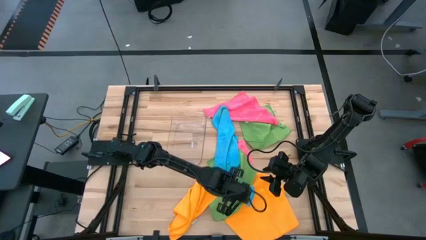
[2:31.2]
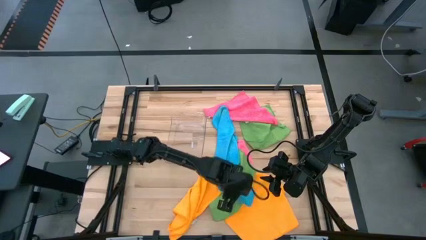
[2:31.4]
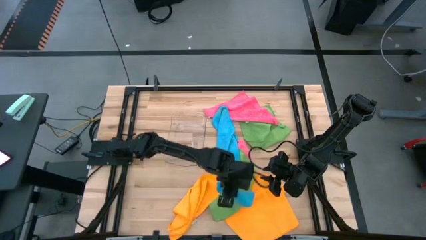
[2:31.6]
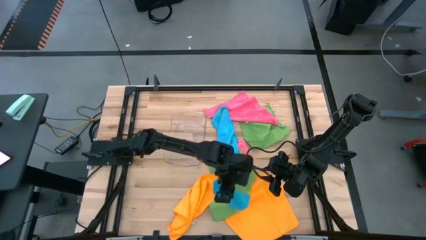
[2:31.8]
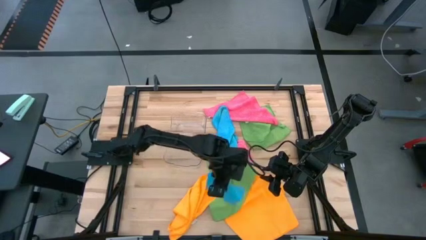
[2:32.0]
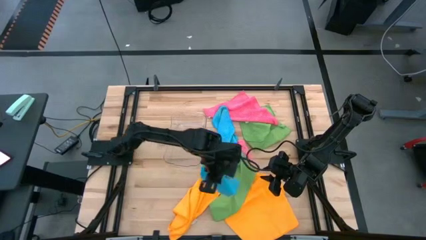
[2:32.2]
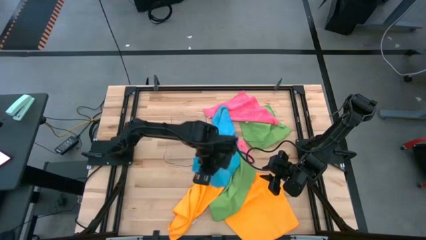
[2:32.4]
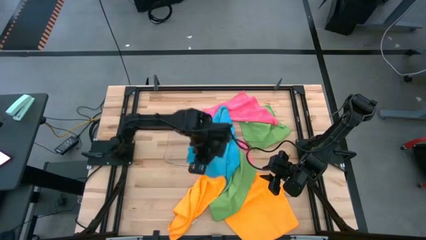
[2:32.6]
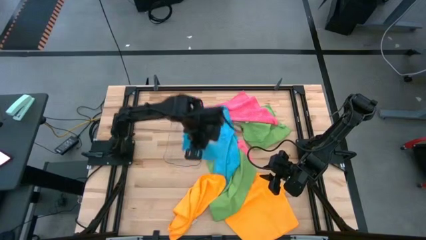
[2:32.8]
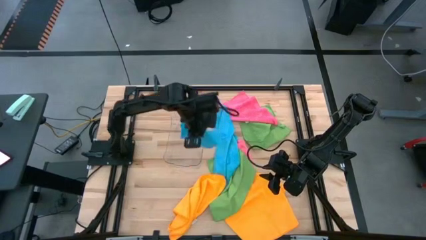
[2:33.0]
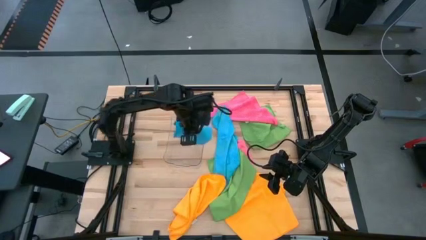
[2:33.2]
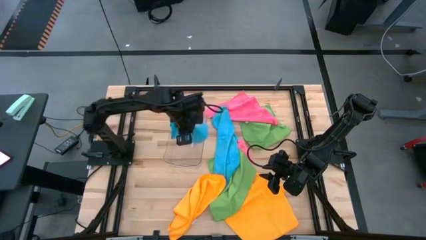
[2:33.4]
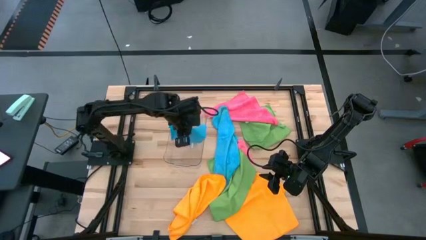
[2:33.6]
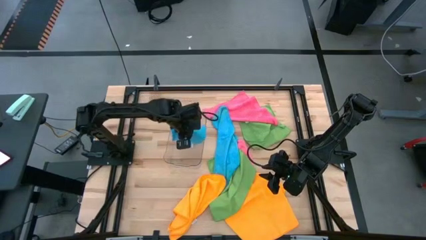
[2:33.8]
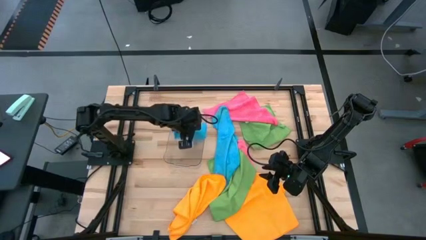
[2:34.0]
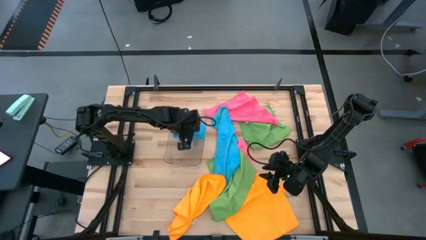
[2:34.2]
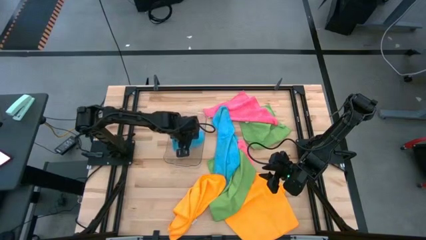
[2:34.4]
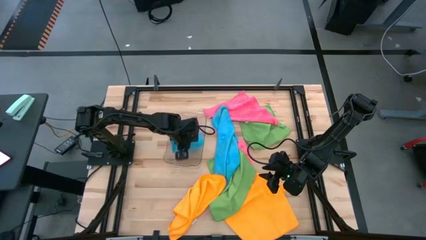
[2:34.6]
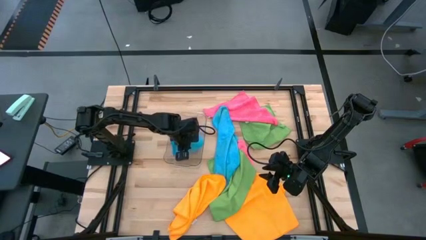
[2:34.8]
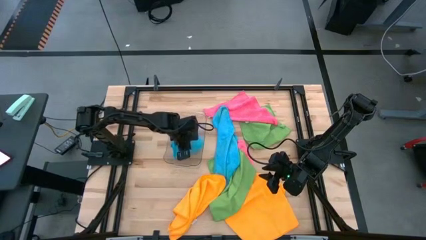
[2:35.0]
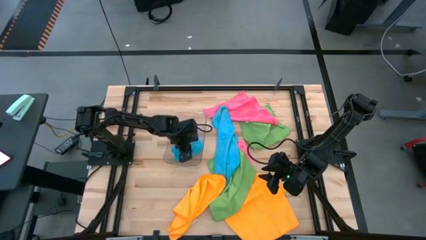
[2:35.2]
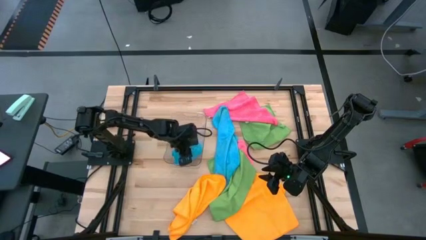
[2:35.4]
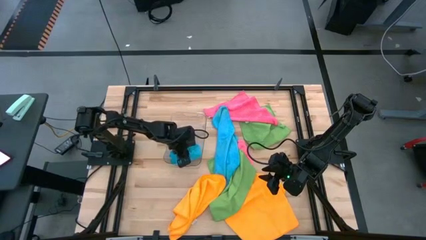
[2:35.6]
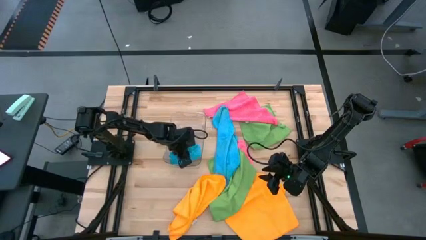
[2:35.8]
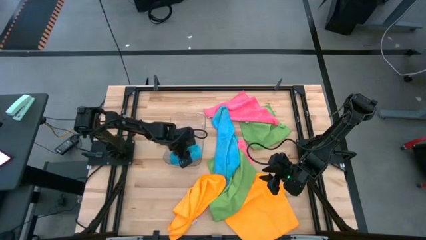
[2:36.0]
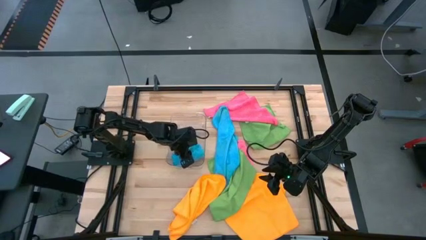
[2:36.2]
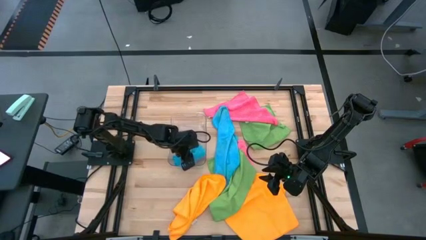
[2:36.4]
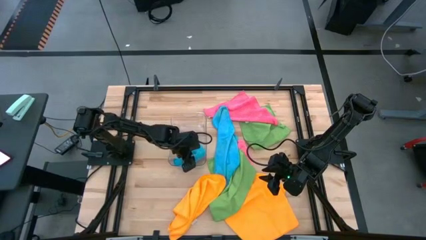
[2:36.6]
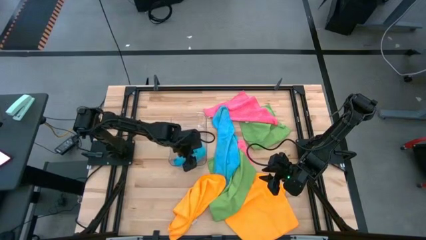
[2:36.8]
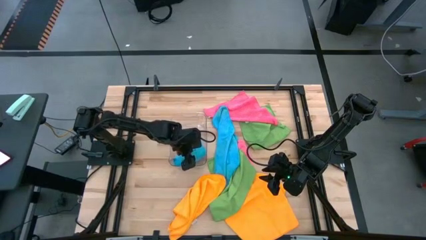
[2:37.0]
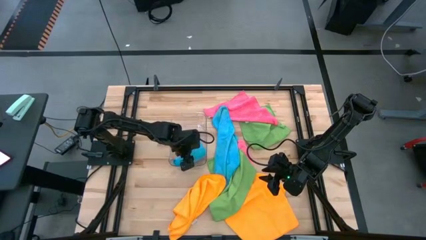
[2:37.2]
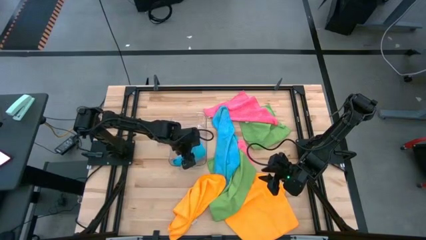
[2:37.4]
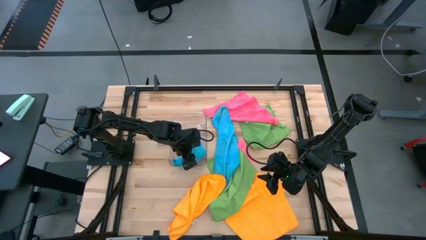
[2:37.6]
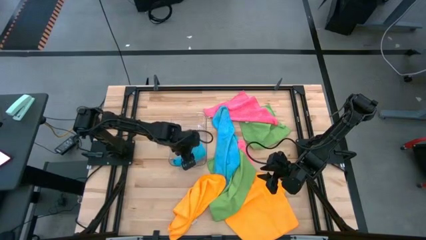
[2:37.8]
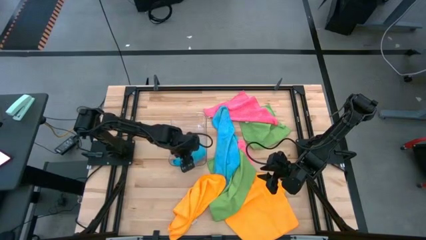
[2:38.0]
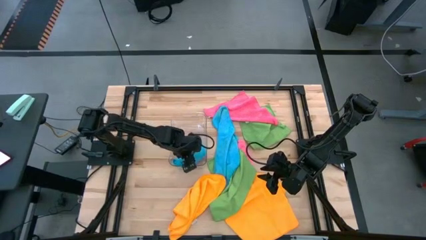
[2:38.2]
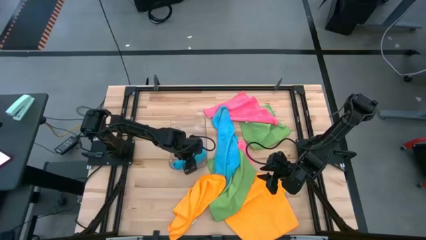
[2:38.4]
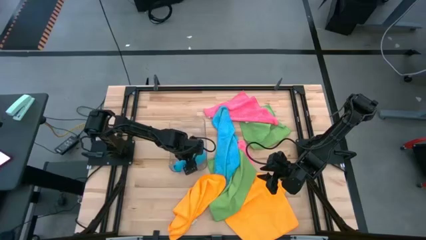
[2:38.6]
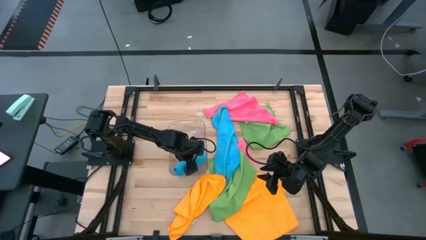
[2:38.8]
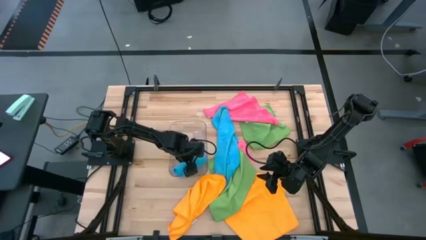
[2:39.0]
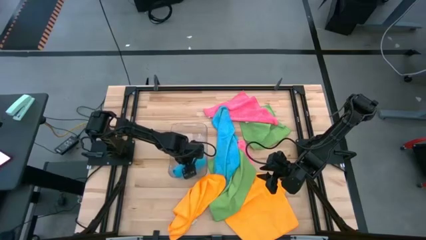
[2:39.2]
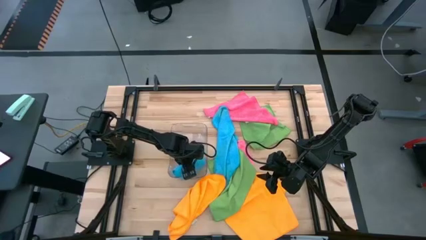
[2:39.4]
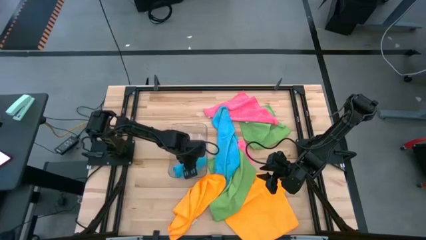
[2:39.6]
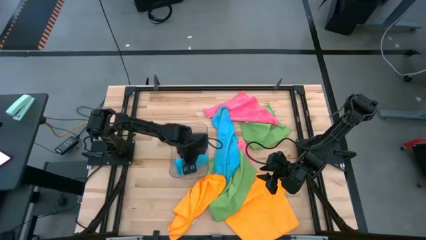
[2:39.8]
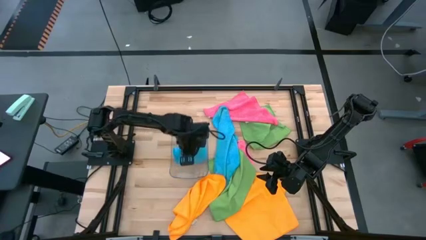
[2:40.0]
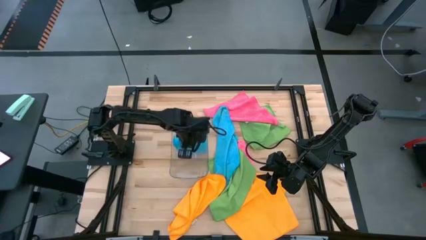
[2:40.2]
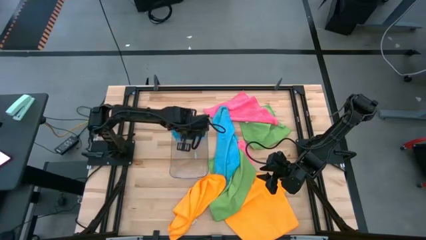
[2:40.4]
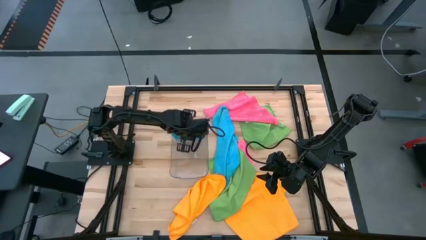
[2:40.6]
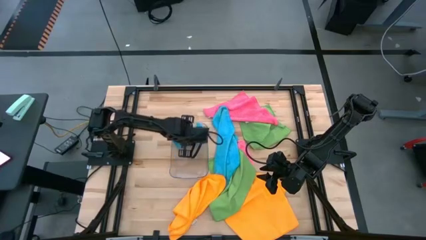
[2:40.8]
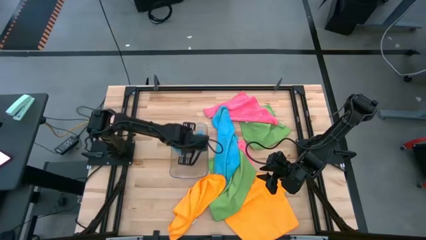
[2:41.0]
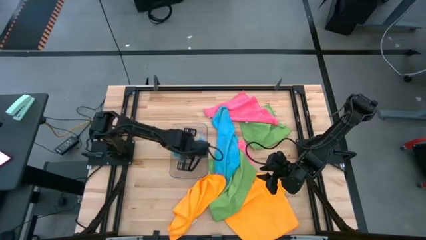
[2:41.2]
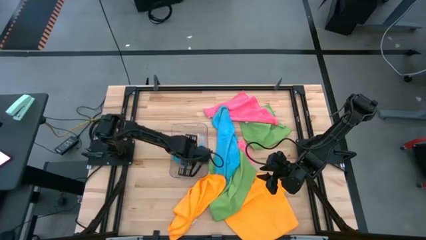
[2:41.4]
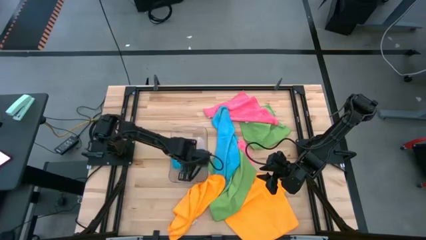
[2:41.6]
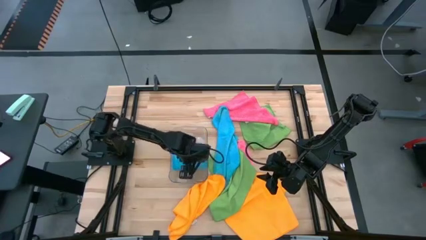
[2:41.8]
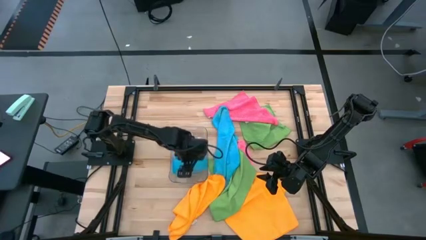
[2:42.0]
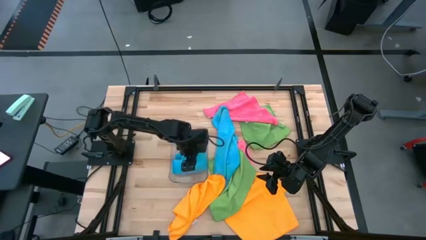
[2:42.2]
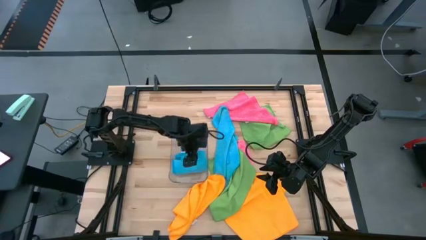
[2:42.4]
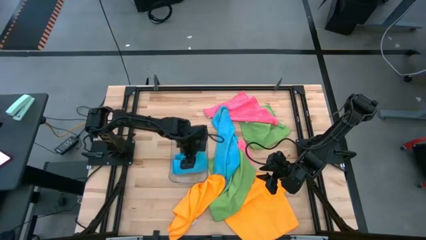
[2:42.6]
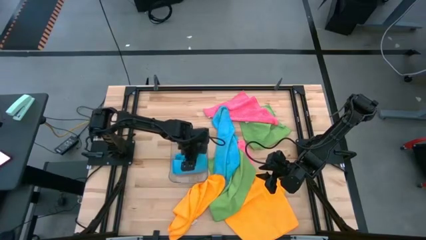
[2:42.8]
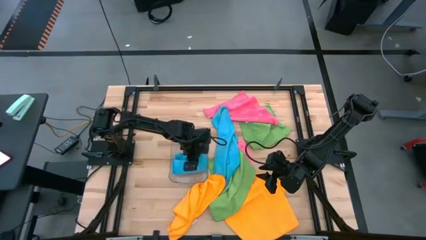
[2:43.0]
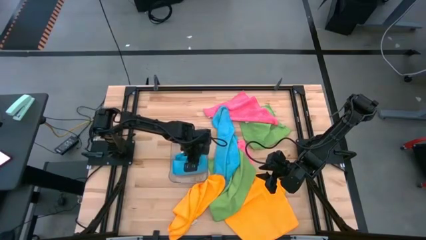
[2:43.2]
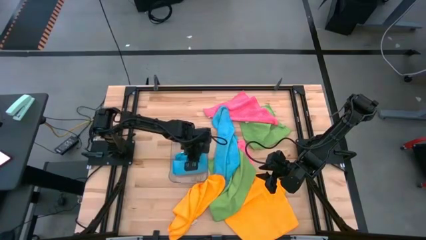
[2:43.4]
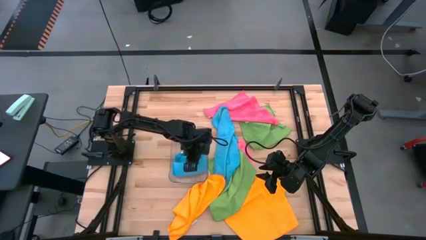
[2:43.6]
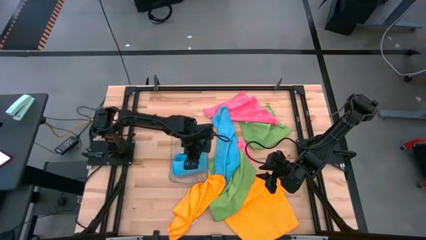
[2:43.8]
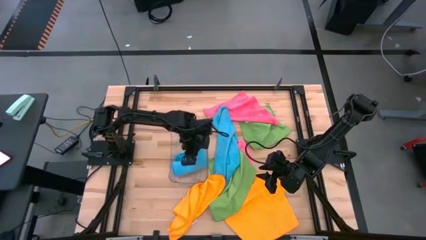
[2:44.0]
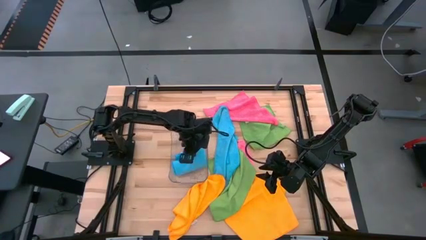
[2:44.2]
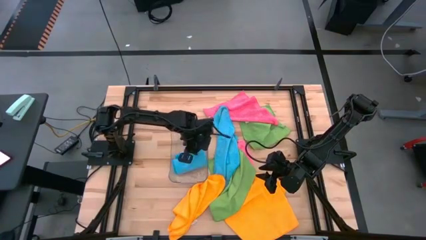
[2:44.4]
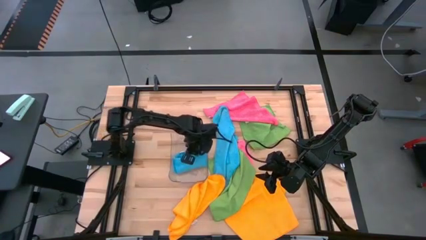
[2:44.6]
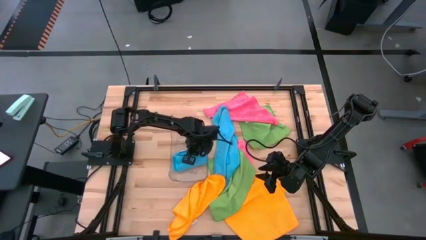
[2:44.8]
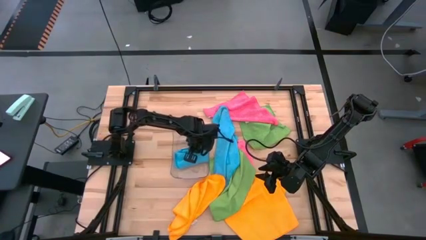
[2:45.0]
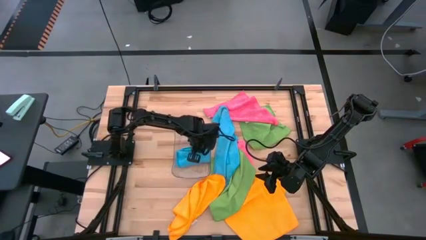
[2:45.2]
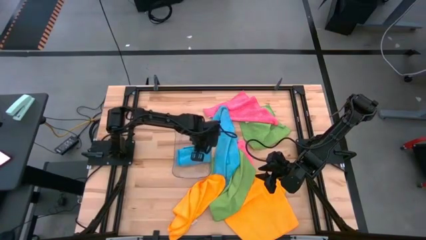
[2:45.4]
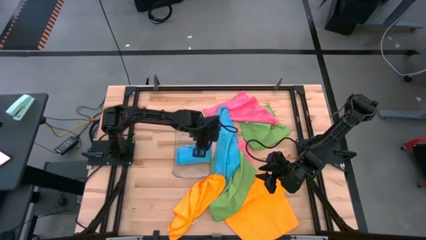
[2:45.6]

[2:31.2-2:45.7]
Task: Fold microfiber towels
Put the left blue towel into the transparent bin
